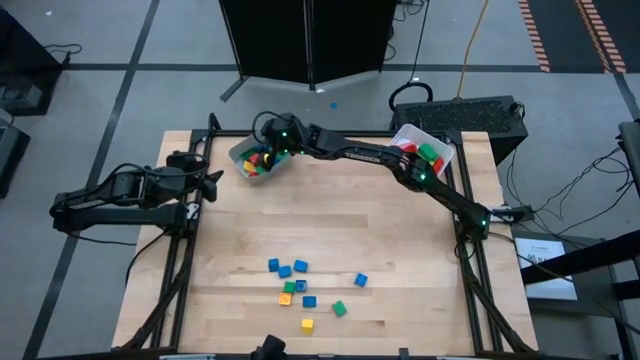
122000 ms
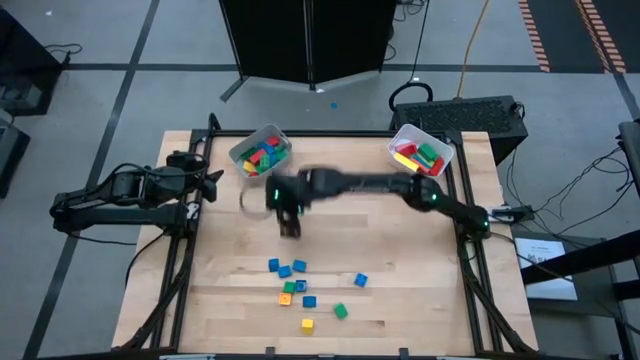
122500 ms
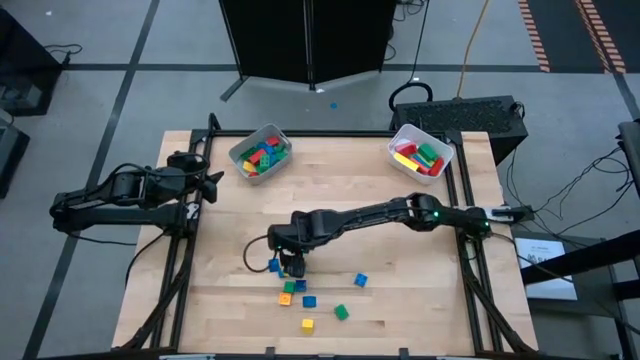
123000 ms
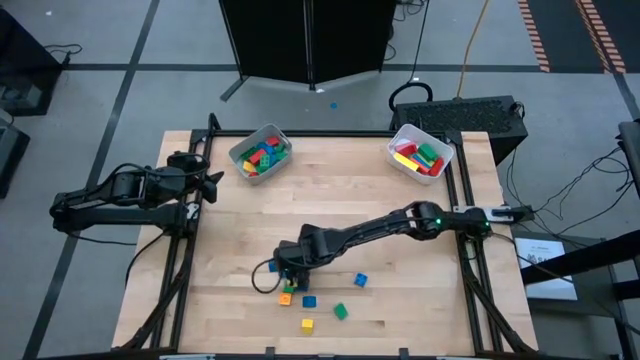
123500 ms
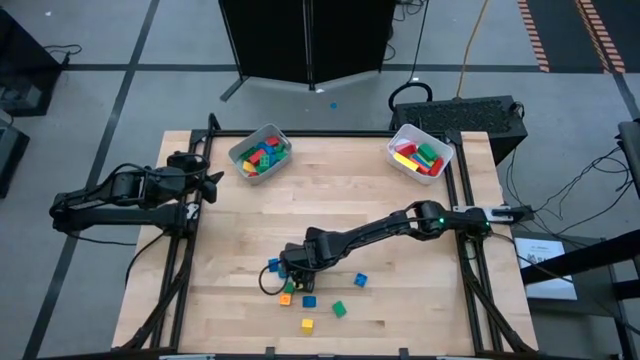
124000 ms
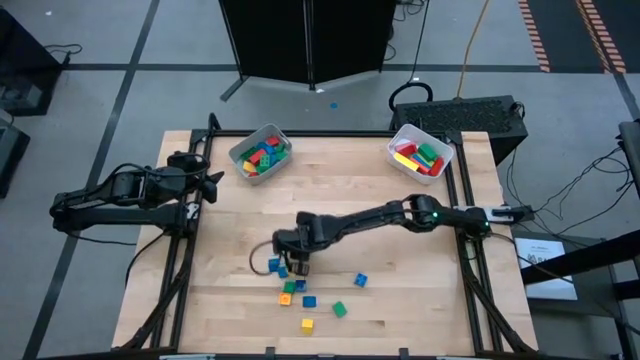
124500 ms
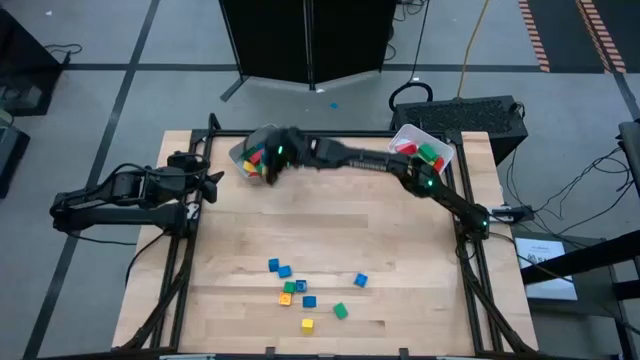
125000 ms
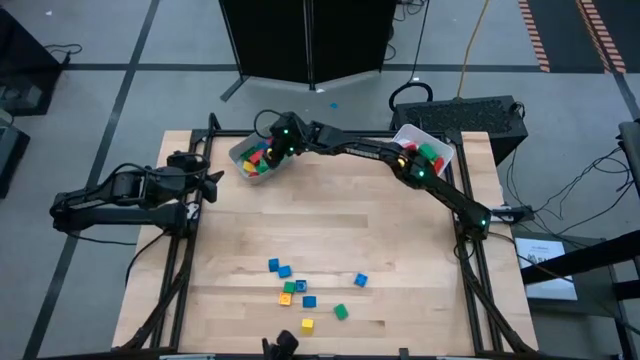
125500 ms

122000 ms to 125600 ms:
Task: Sort blocks by size
Put the half cylindrical blue block into the gray bin

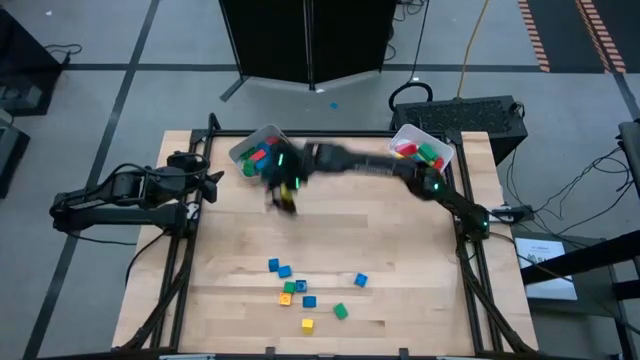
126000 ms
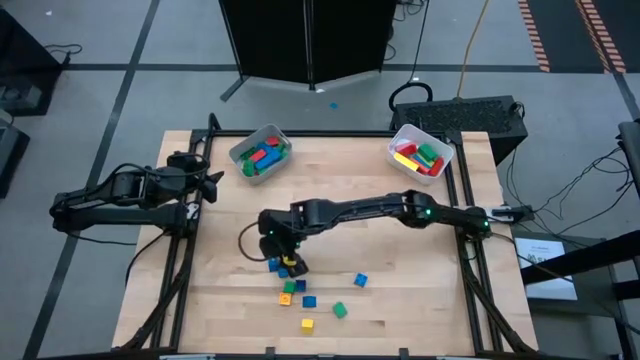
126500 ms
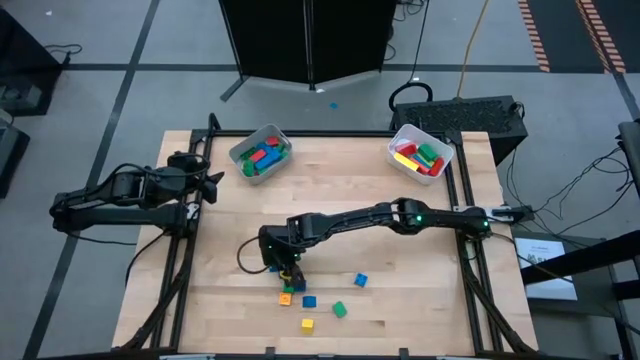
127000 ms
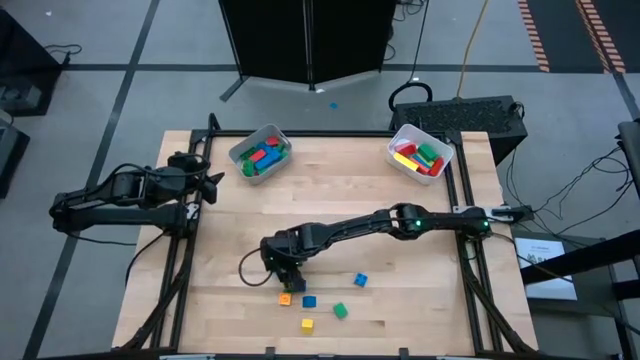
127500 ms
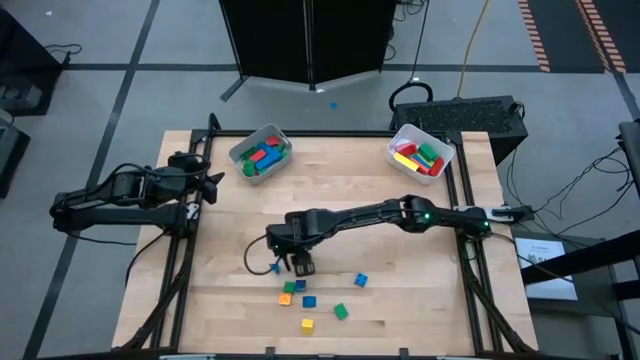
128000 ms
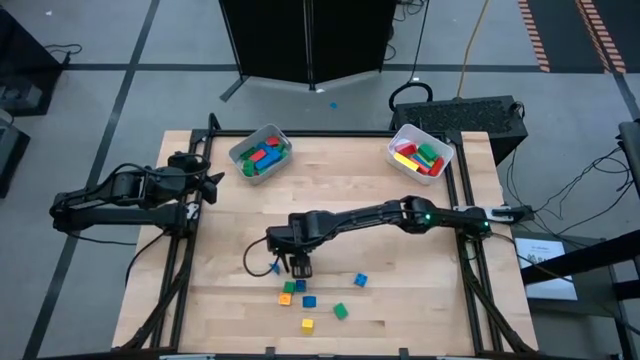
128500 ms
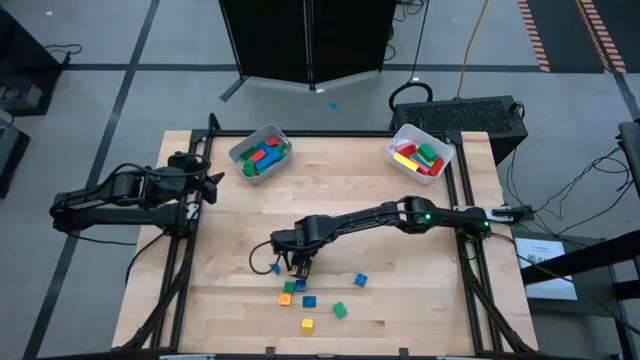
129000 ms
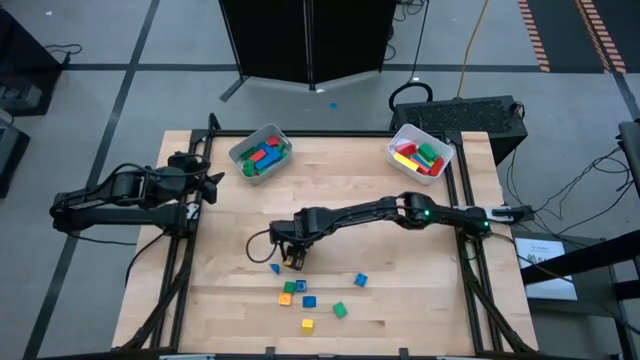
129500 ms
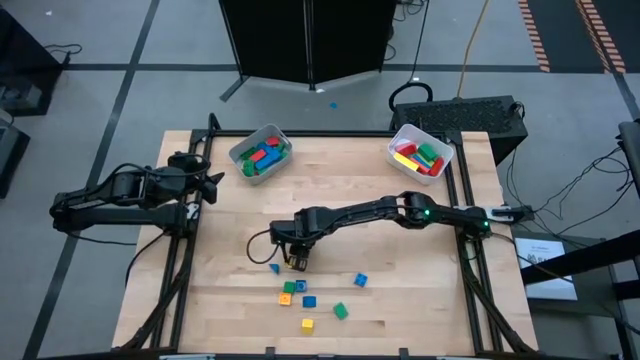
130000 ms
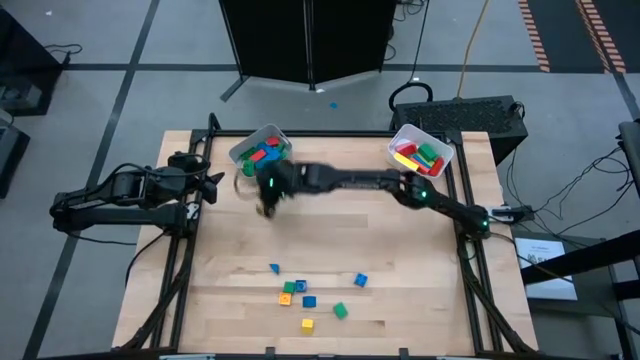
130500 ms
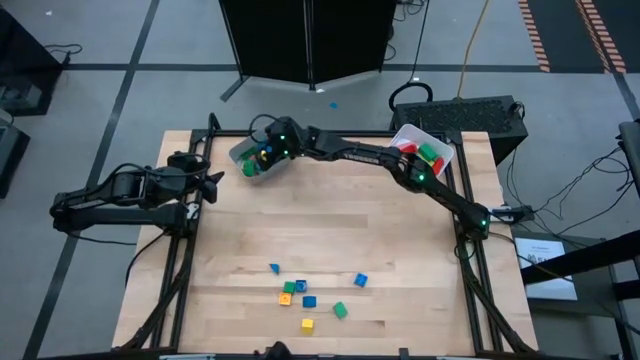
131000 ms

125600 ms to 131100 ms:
Put the triangular blue block into the gray bin

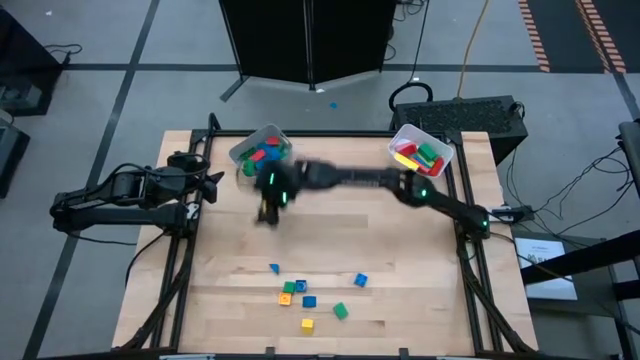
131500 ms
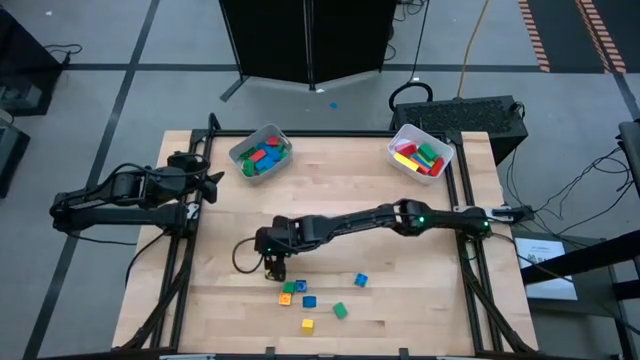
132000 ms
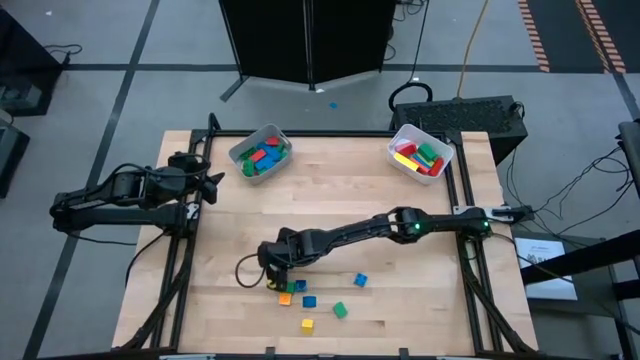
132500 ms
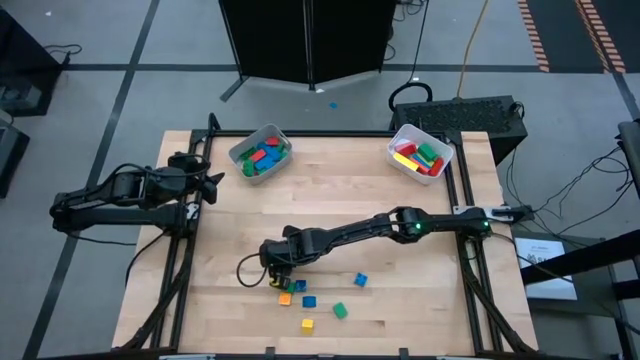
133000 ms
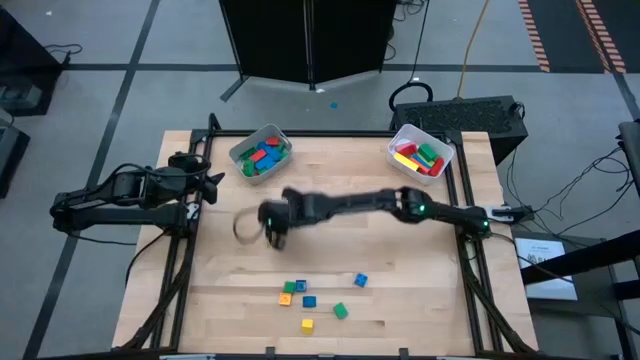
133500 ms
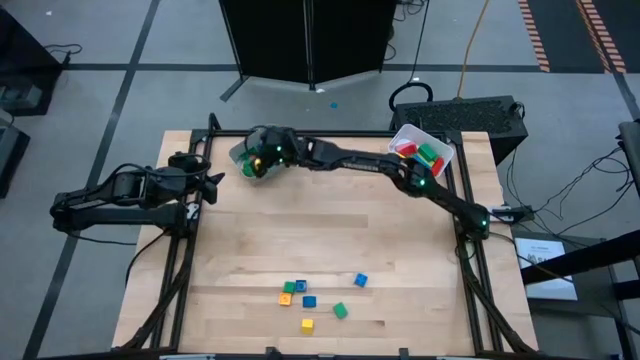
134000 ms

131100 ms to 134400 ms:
Put the triangular blue block into the gray bin

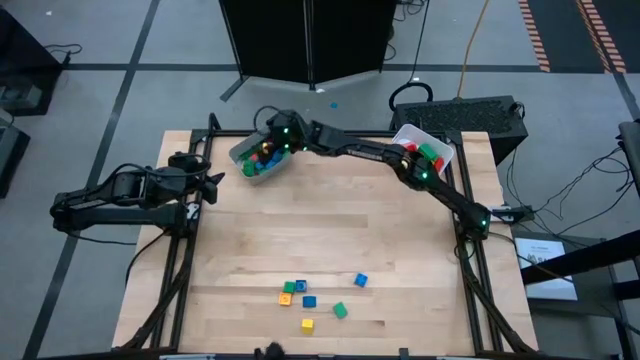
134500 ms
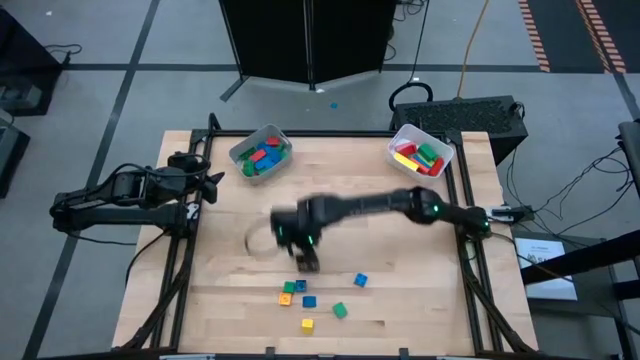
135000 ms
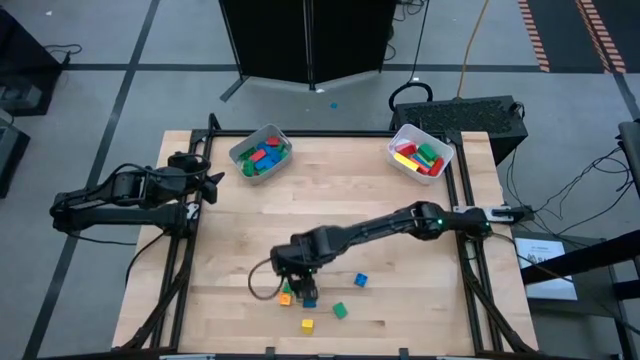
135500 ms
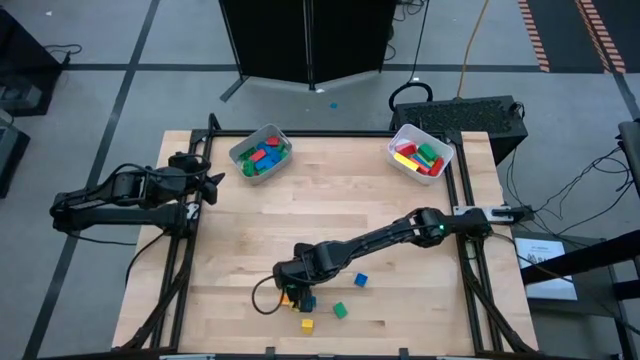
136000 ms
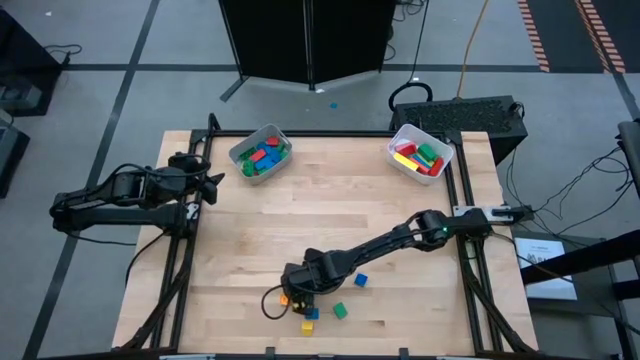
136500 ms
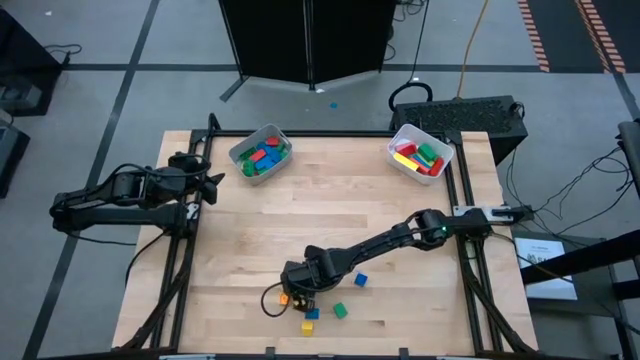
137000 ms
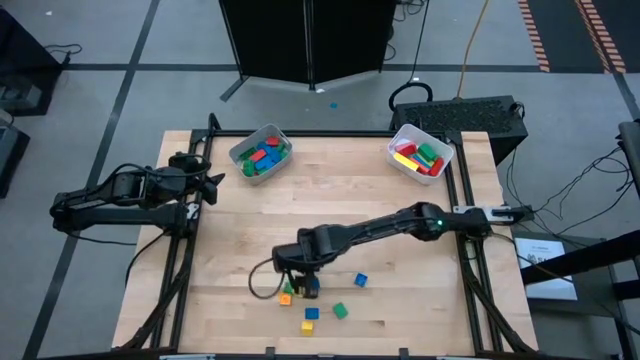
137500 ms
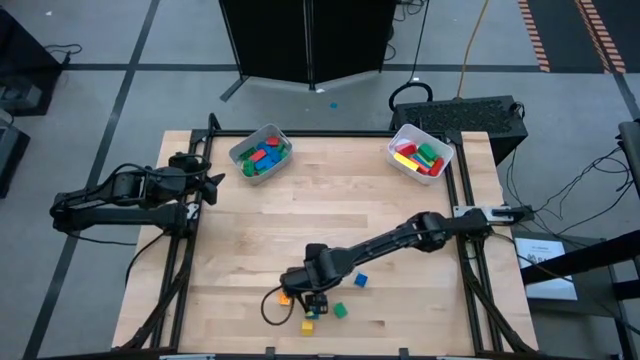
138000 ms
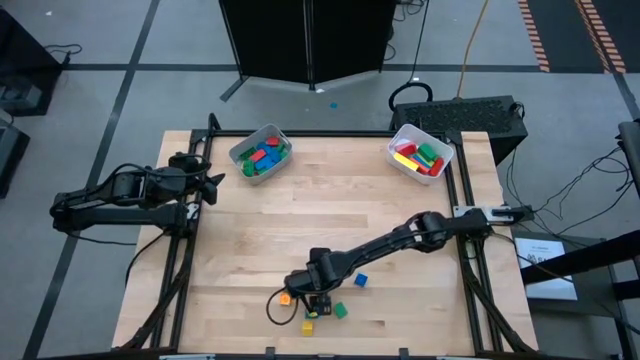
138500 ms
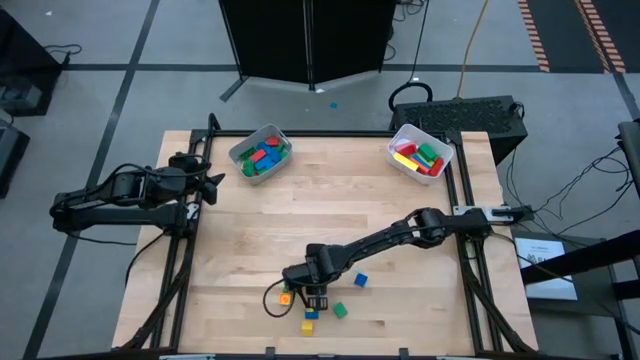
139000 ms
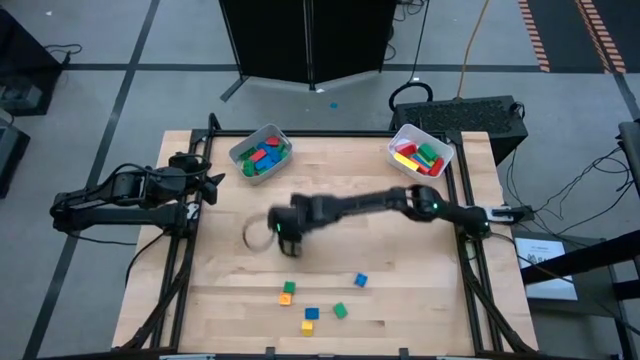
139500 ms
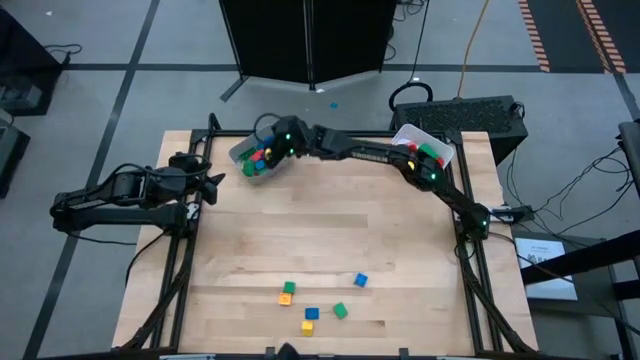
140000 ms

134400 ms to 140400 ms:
Put the 4 stud blue game piece into the gray bin

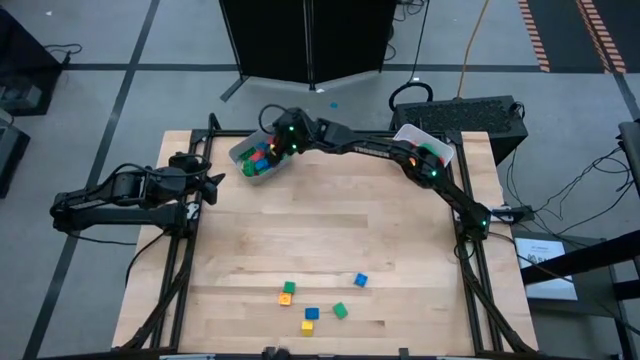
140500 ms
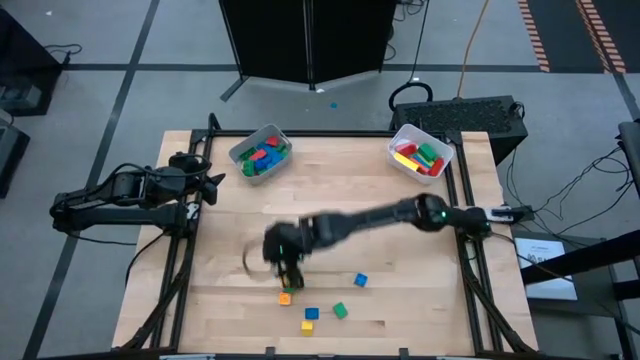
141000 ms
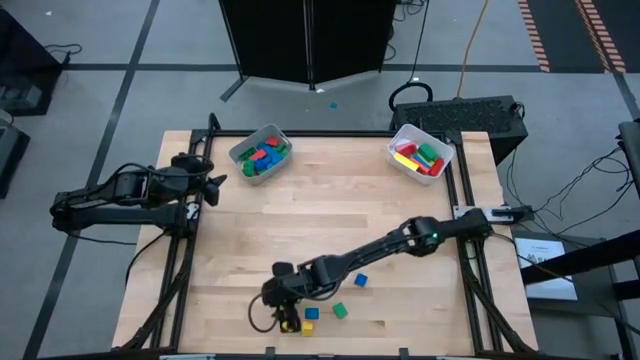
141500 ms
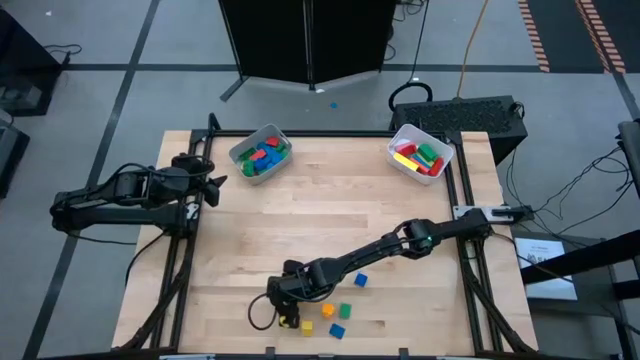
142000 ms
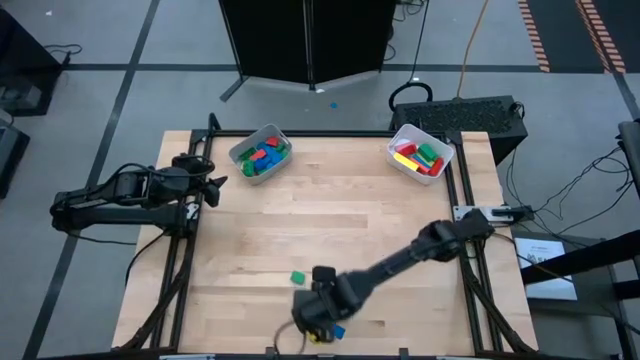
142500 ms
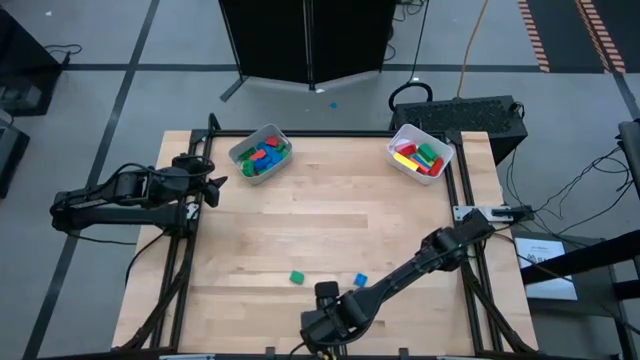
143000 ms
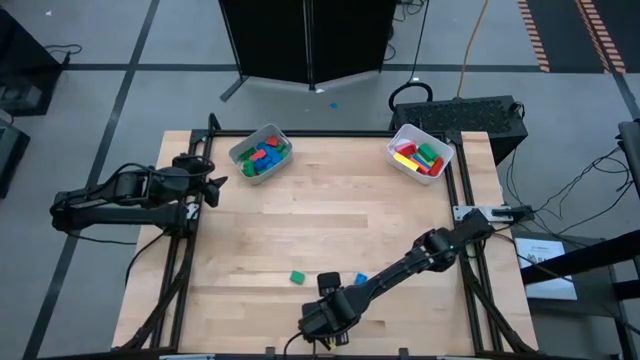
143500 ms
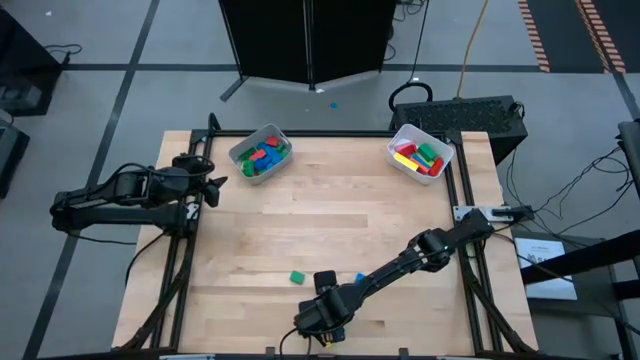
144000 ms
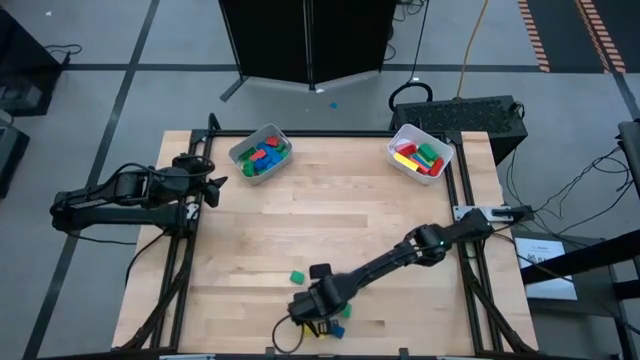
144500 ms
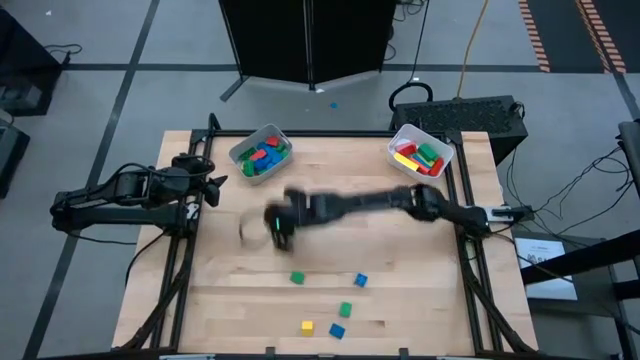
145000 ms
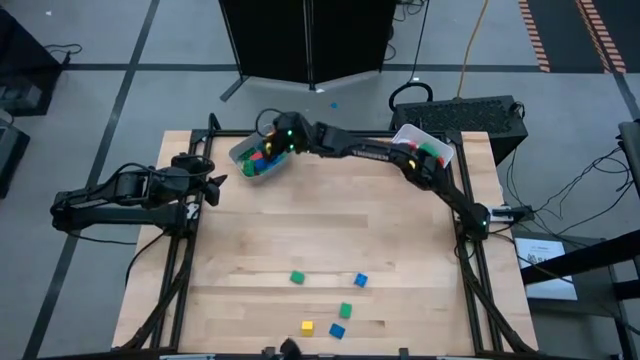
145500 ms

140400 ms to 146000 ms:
Put the 4 stud yellow game piece into the gray bin
